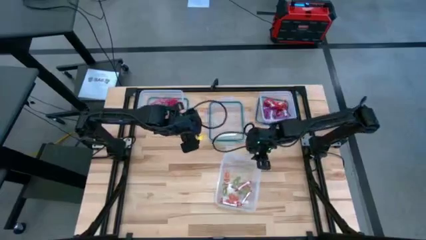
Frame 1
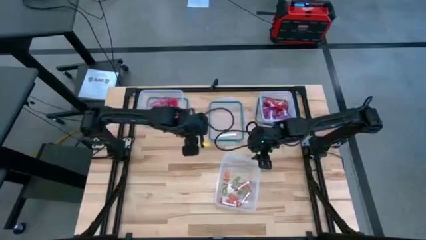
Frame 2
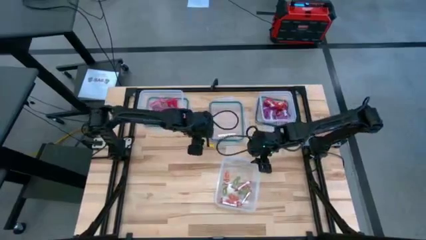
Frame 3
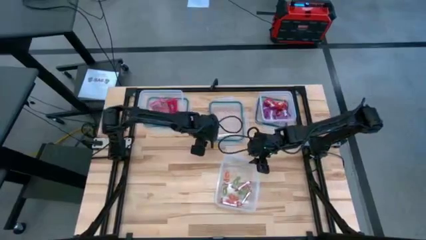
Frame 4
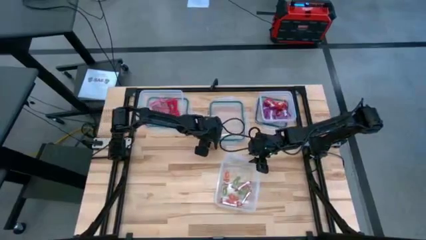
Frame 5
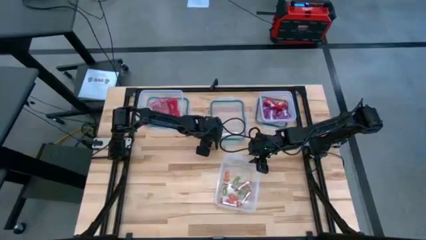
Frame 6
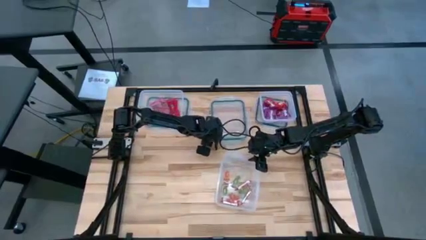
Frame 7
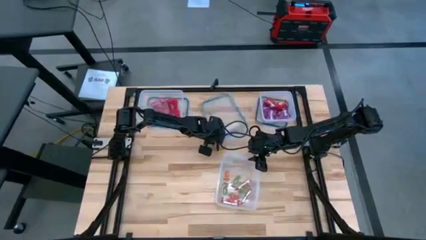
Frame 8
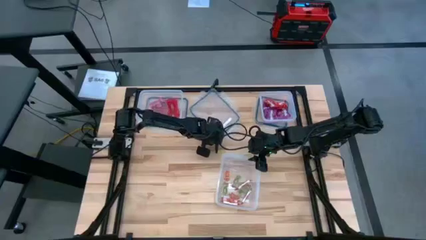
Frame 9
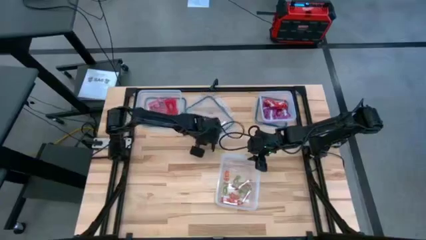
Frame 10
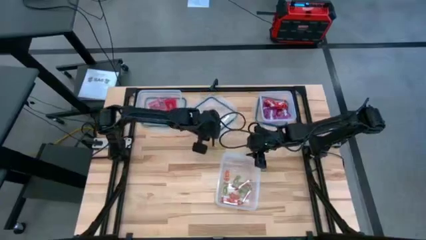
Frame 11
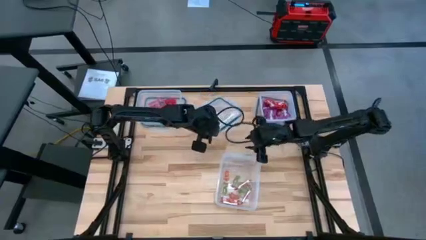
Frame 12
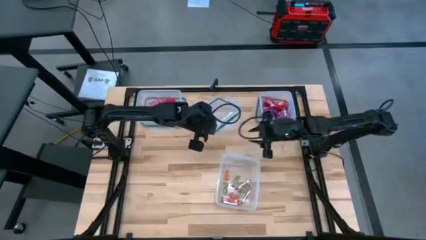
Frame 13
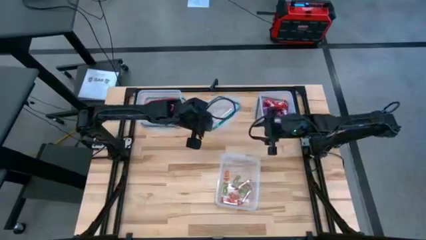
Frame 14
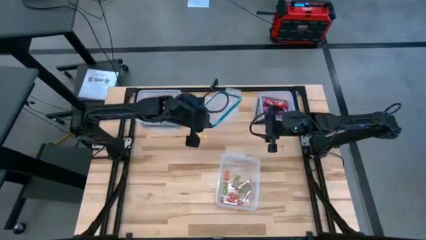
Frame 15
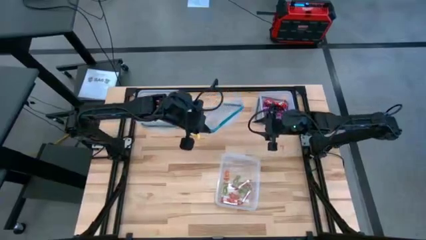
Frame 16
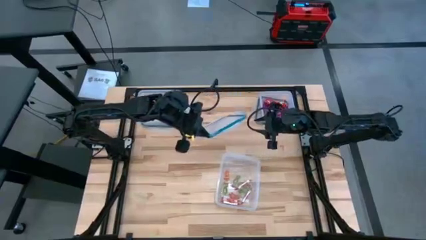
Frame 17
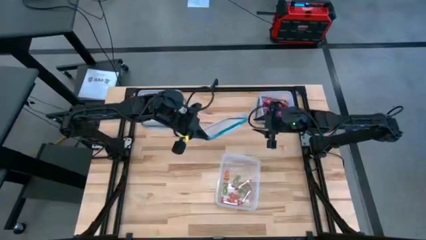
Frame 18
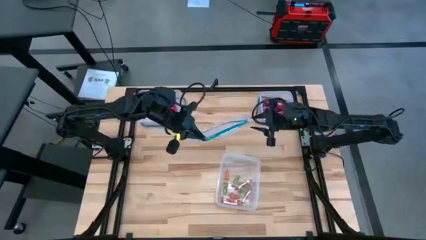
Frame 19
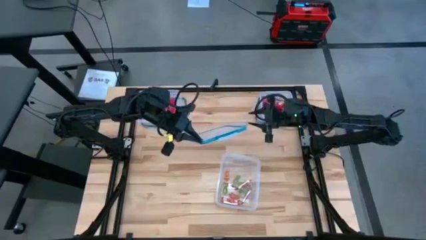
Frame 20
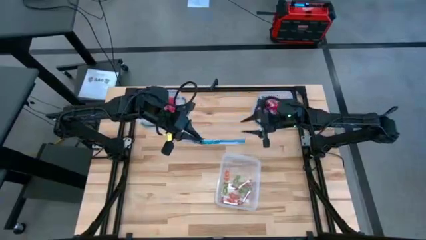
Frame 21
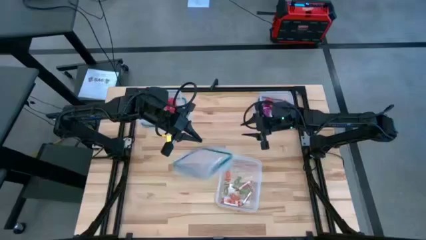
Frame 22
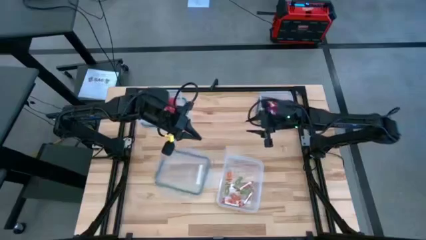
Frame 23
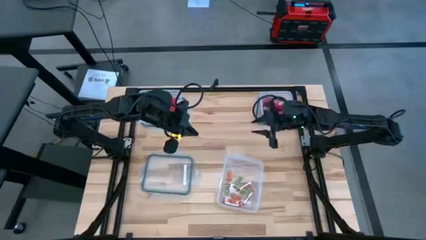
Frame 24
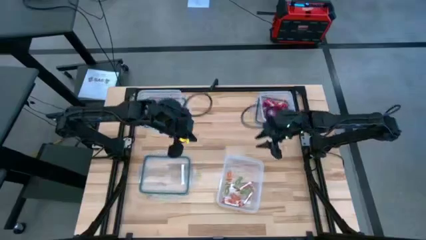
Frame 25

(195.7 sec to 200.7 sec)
Task: Sort candy
Close the center transparent bin

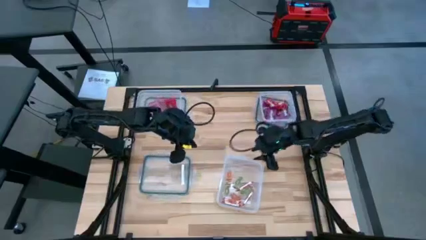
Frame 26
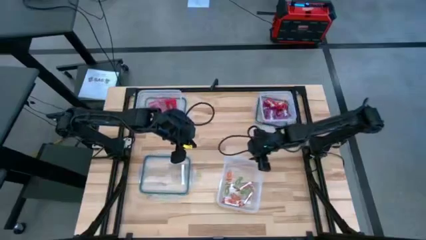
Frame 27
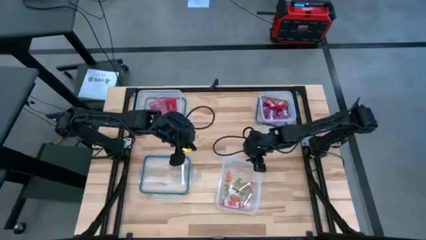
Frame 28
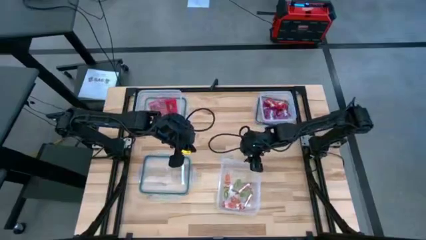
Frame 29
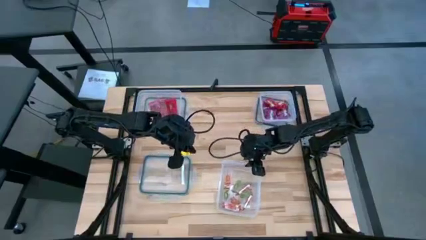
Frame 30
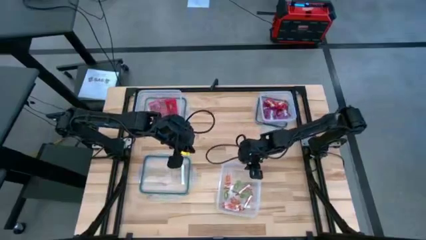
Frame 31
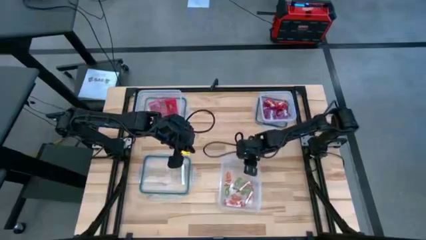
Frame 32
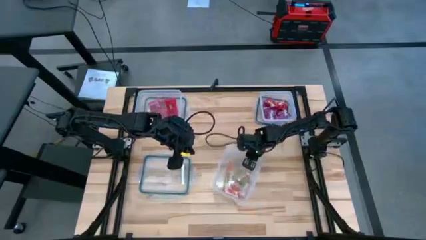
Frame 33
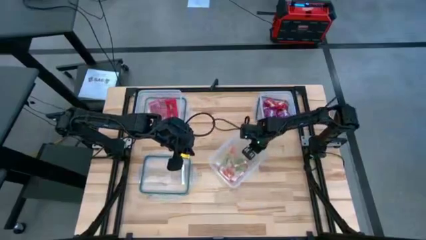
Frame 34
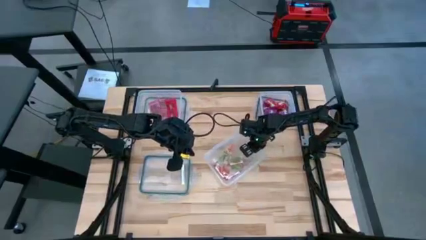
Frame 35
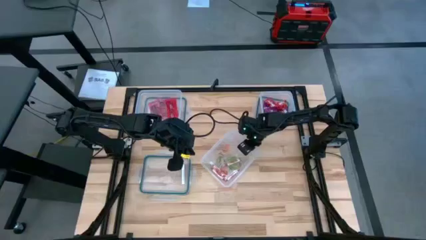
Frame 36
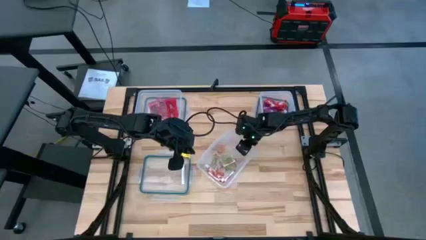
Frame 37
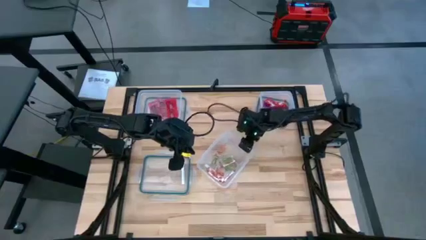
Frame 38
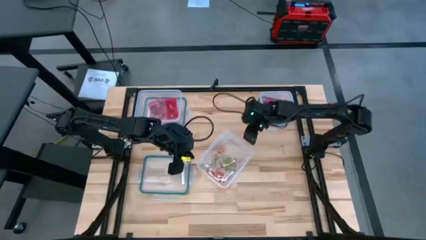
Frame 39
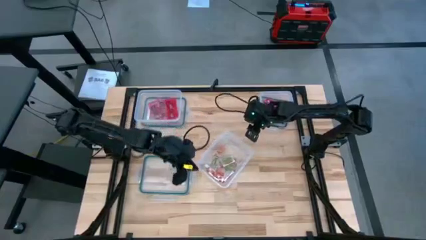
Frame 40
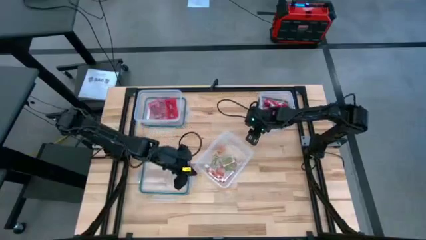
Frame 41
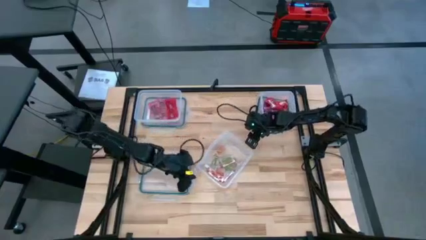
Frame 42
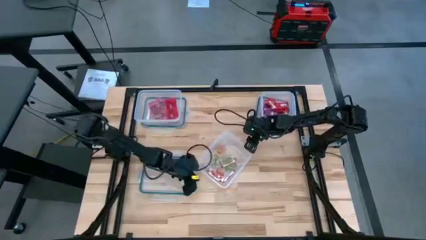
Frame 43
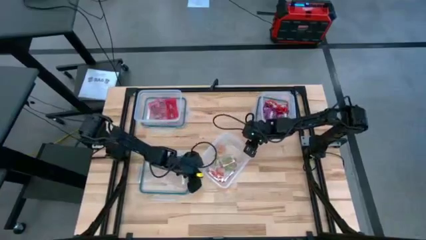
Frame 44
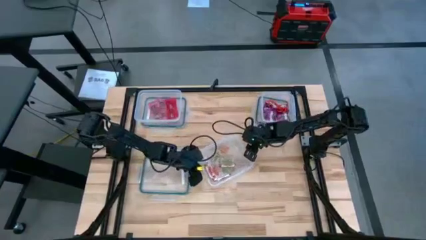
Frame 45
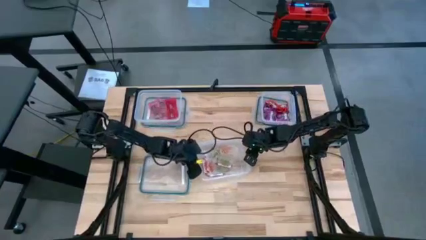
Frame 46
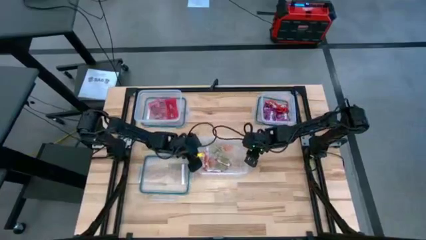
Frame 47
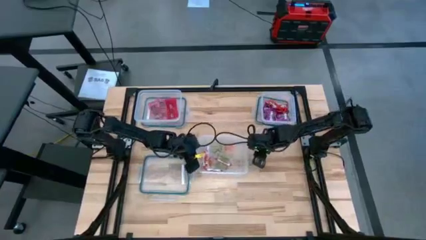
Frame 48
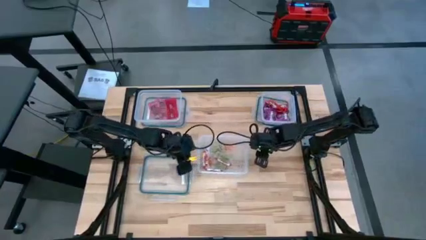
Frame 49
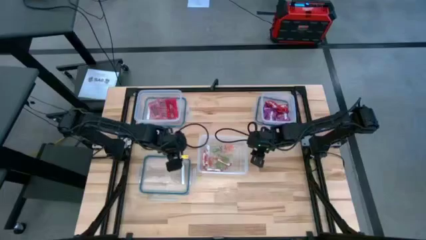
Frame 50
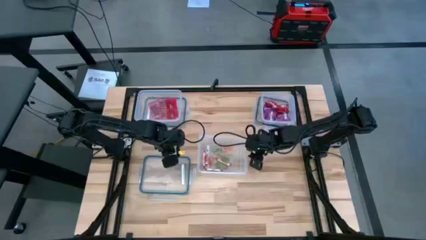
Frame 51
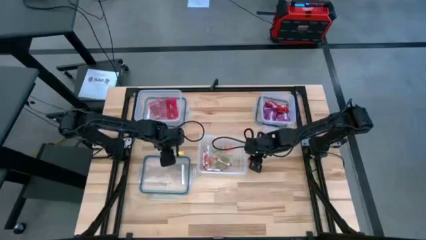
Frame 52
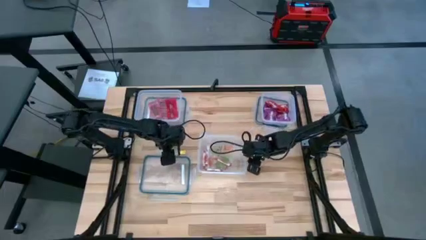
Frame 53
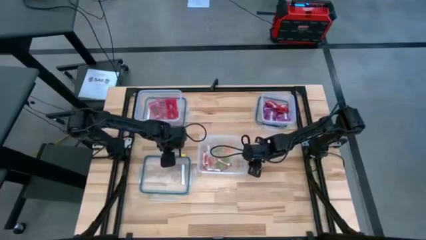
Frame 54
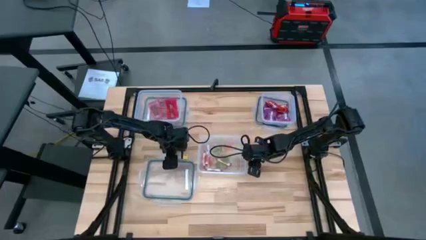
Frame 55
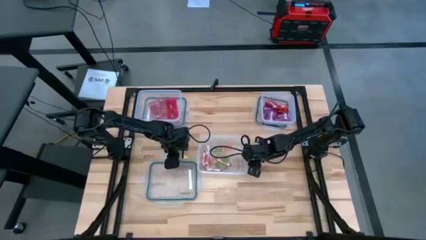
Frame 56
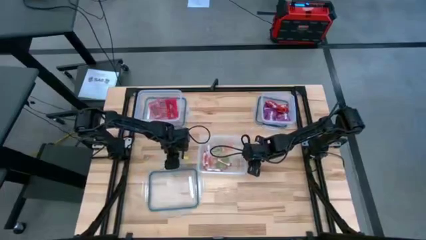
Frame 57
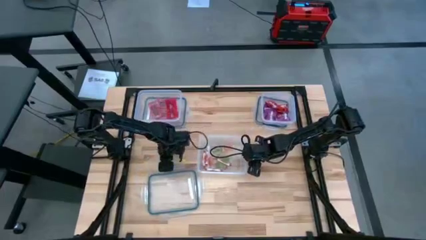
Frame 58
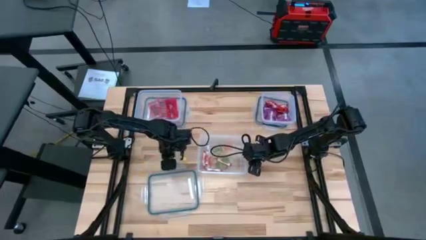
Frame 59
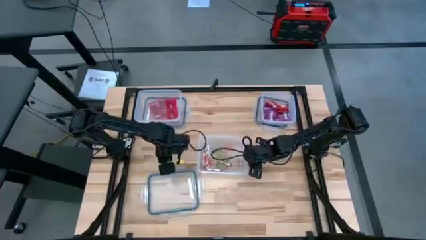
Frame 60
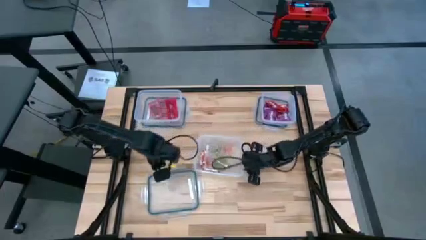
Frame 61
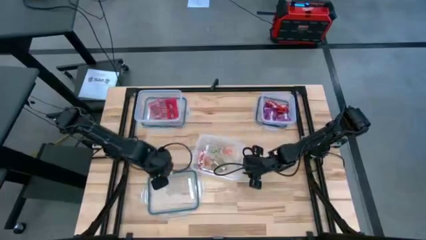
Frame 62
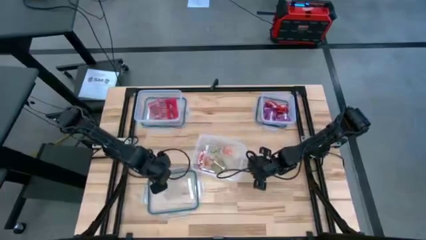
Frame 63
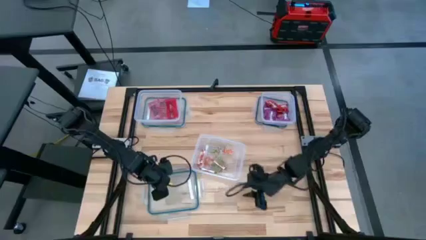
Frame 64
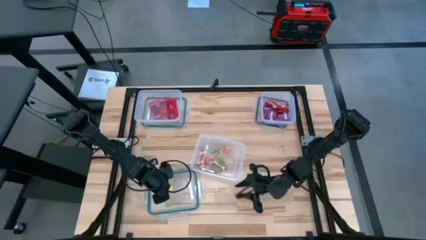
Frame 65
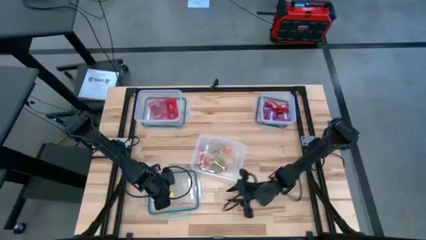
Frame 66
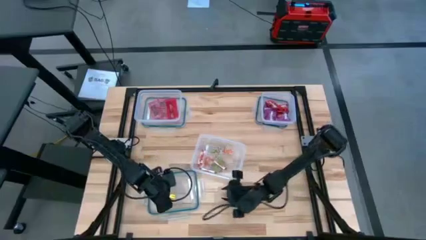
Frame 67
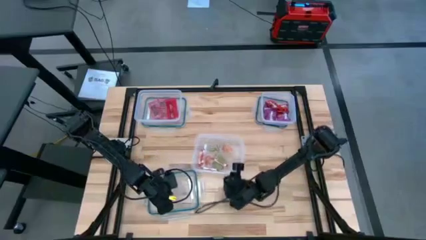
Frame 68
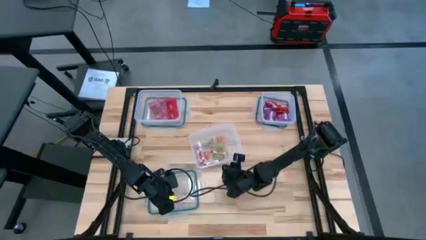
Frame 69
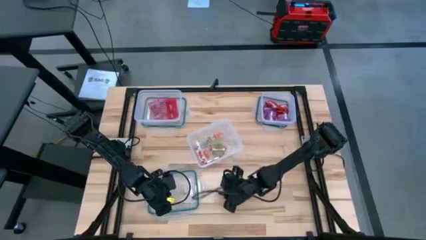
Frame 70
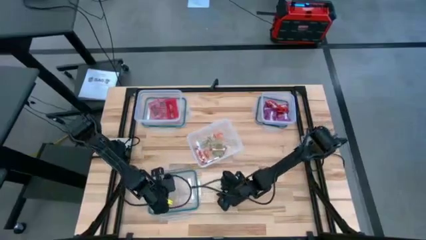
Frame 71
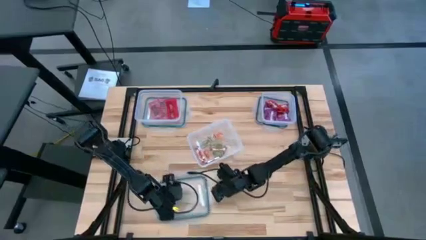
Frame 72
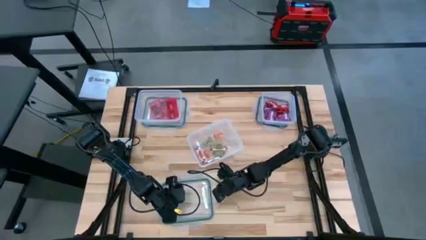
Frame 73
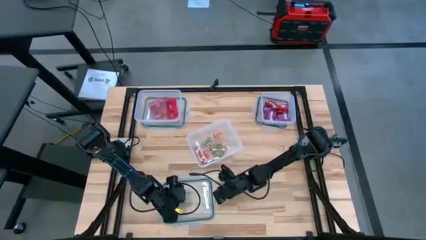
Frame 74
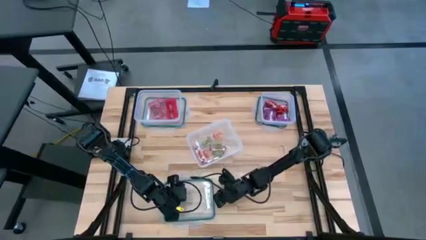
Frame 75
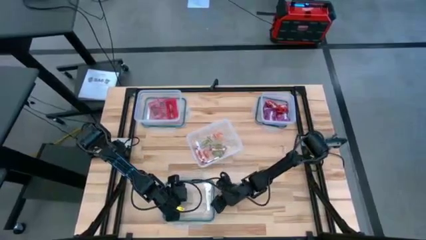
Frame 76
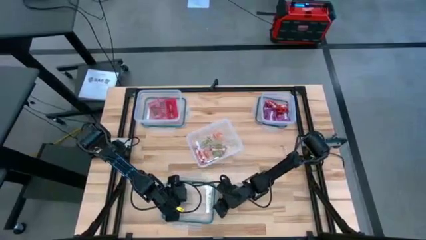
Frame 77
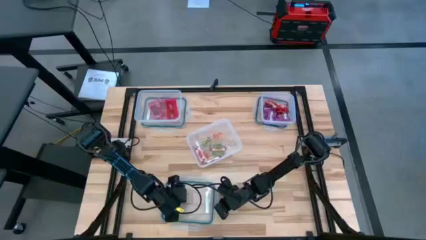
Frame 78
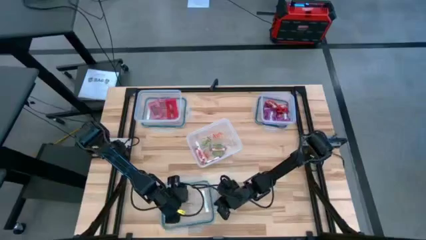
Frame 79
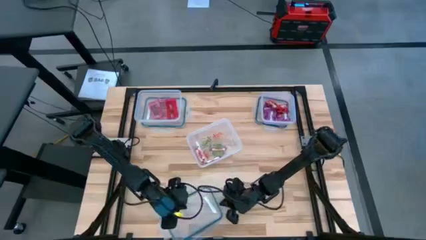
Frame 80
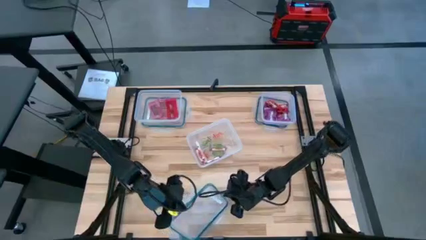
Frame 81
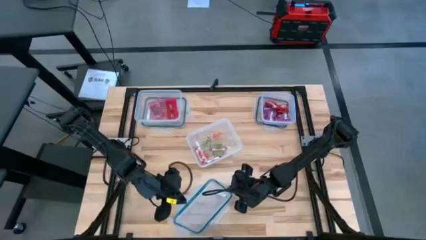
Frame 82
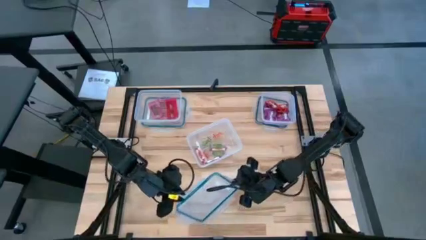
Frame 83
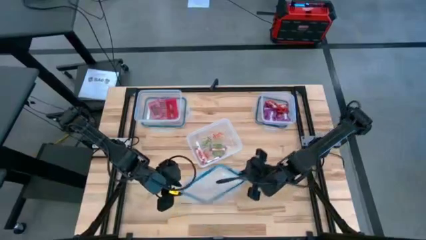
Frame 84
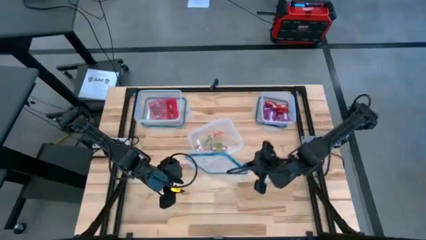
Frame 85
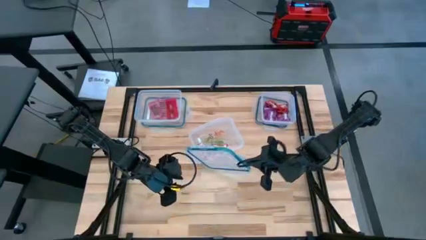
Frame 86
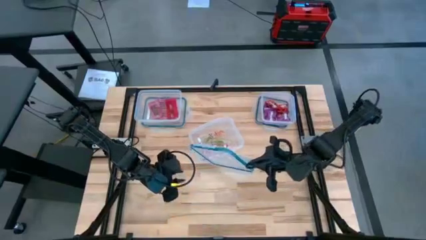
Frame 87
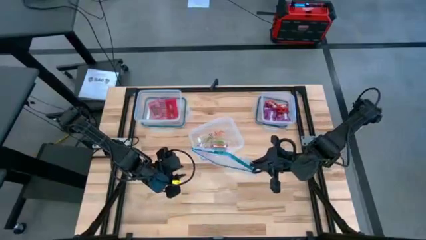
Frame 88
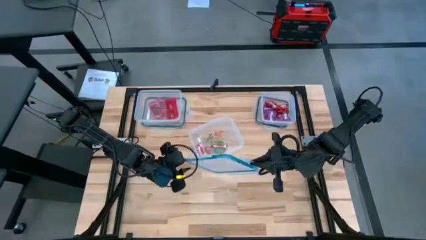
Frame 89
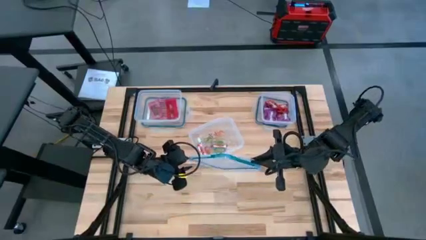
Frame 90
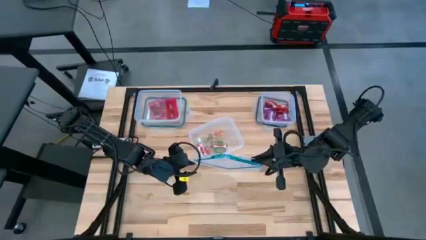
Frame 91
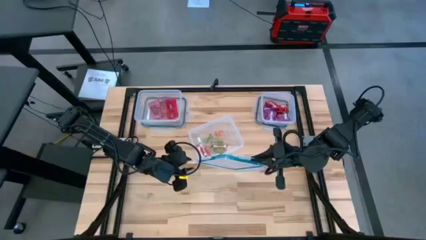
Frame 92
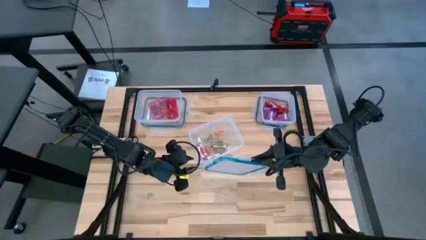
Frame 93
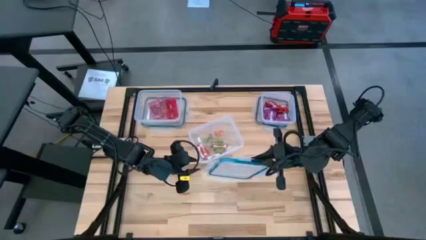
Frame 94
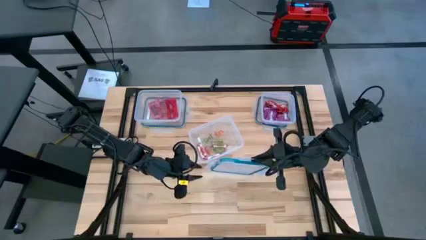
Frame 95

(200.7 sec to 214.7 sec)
Close the center transparent bin
